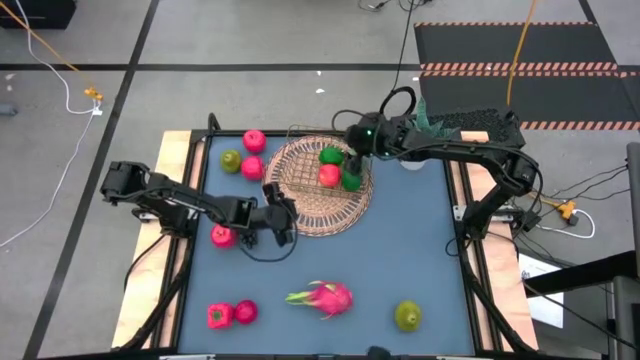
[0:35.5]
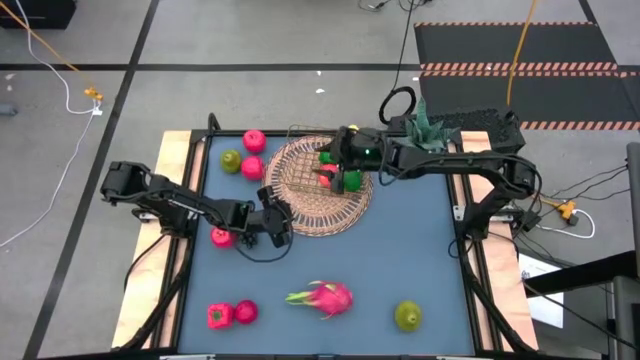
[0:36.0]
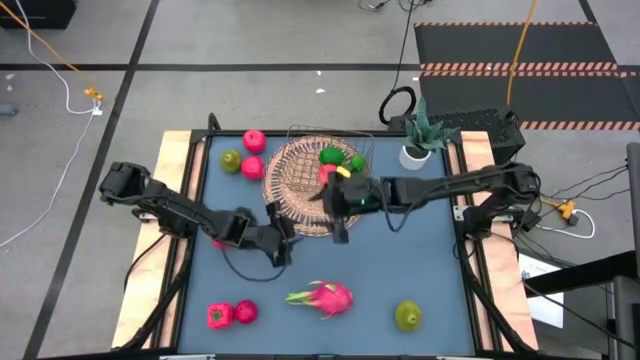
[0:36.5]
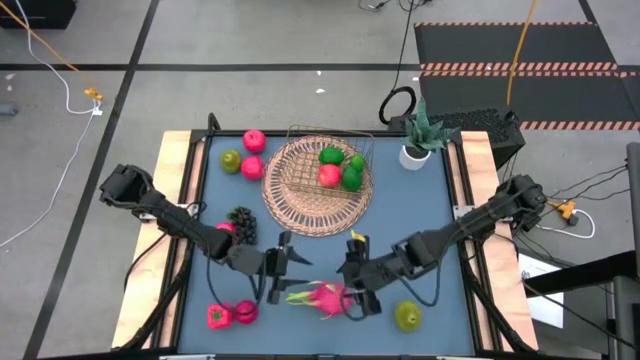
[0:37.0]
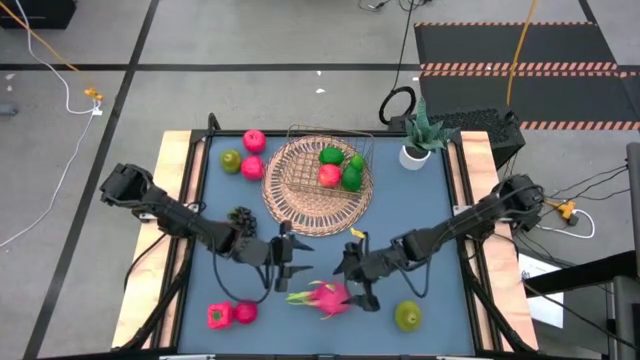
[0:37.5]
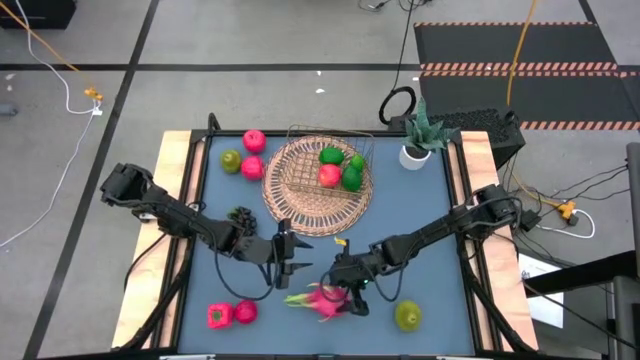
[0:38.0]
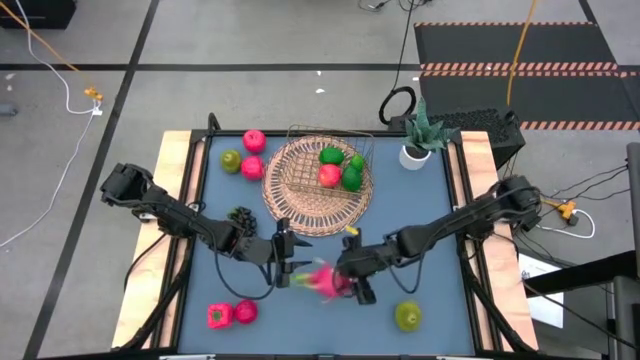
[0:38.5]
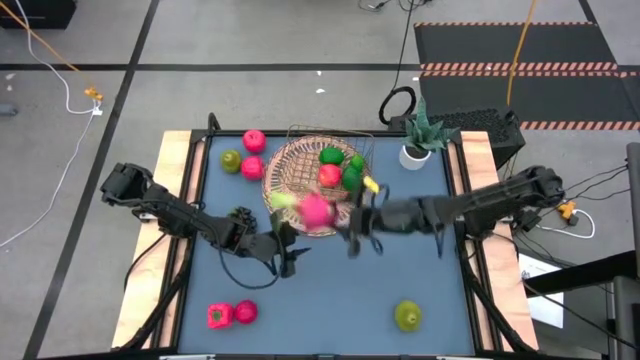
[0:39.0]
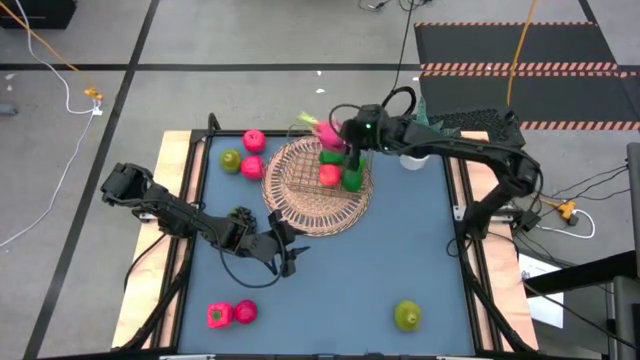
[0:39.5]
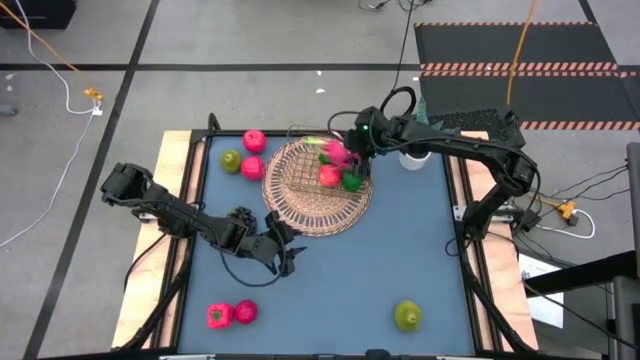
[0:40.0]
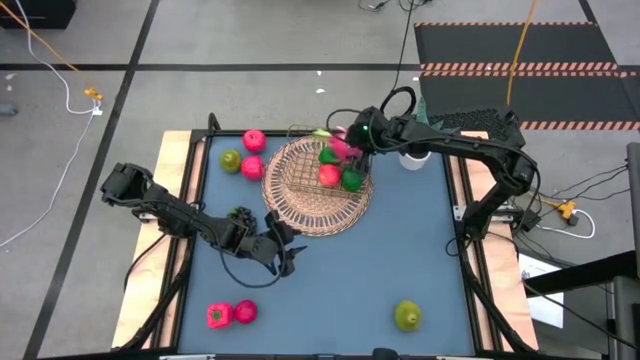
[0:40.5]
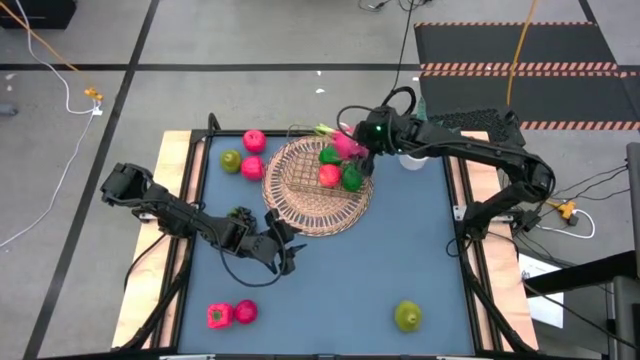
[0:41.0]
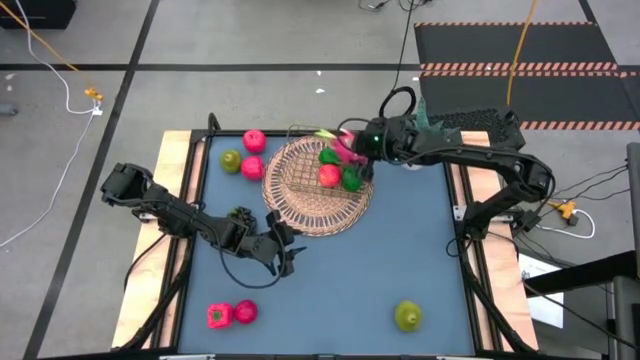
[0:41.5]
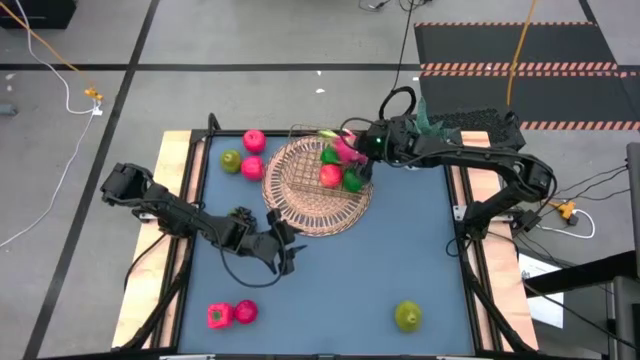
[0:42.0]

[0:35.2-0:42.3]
Task: Build produce basket
Put the dragonfruit into the gold wire basket

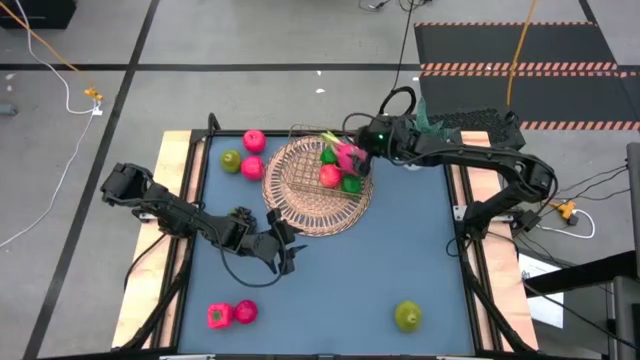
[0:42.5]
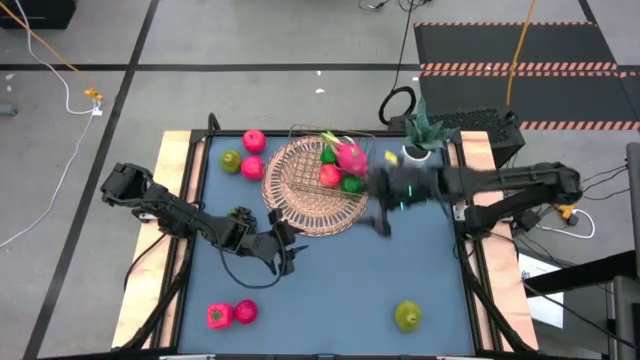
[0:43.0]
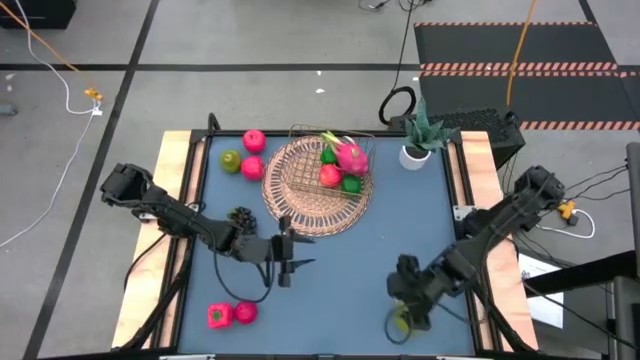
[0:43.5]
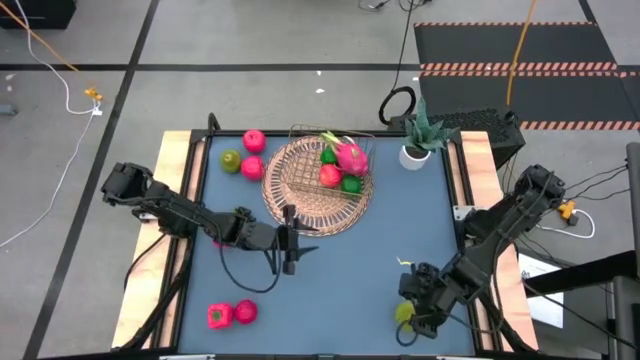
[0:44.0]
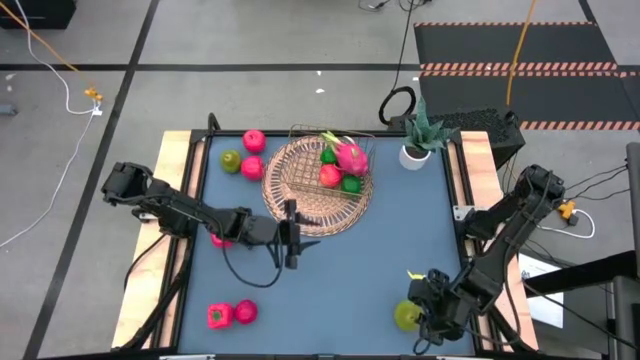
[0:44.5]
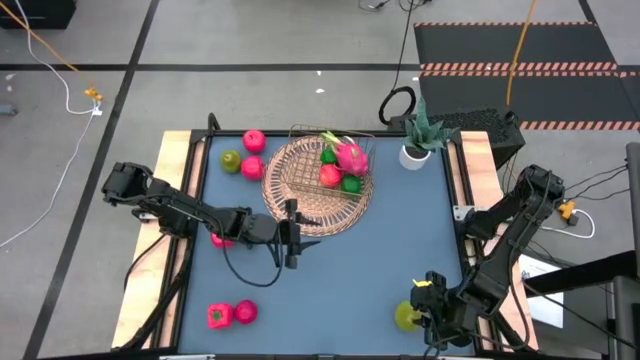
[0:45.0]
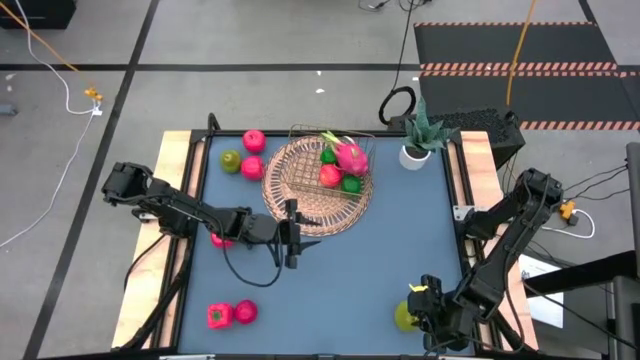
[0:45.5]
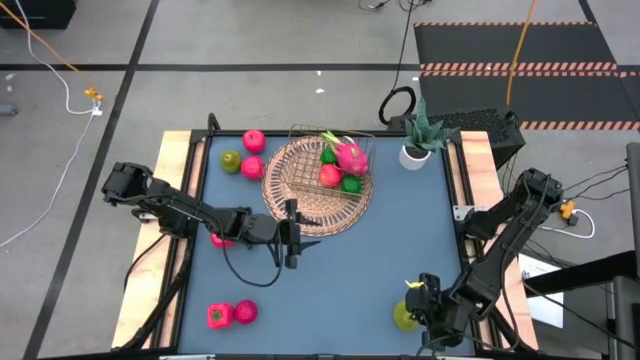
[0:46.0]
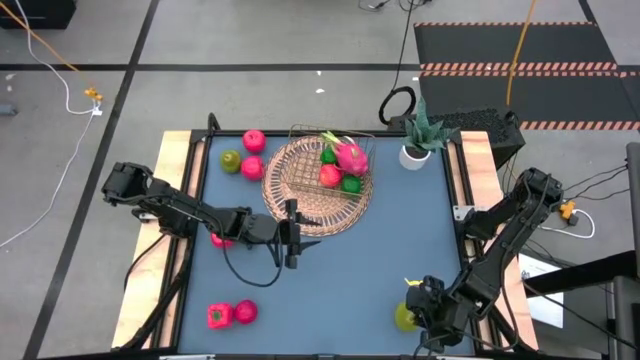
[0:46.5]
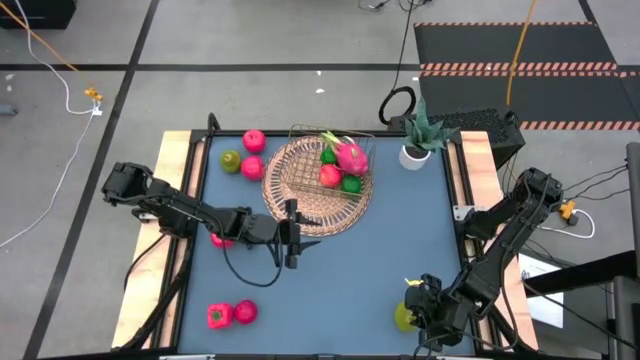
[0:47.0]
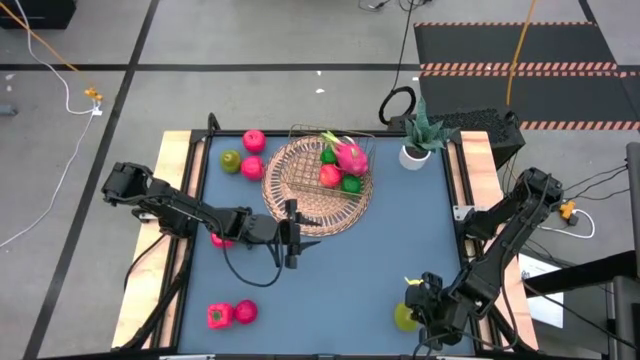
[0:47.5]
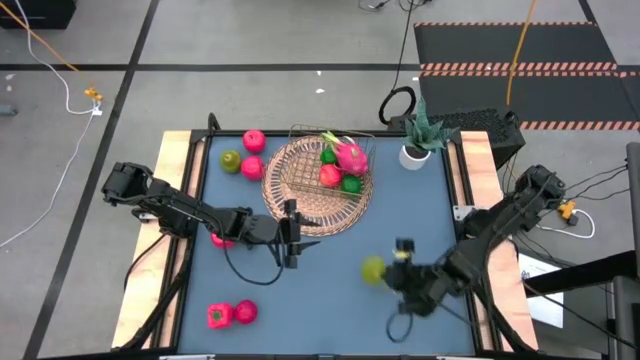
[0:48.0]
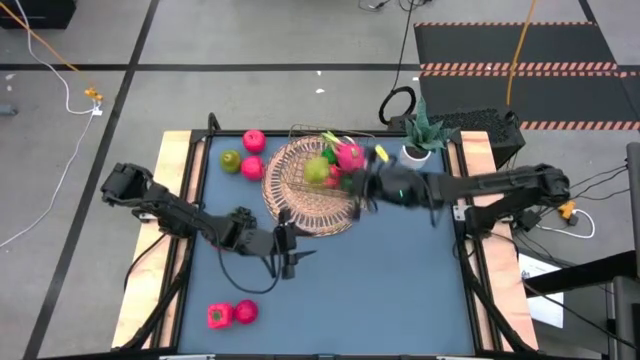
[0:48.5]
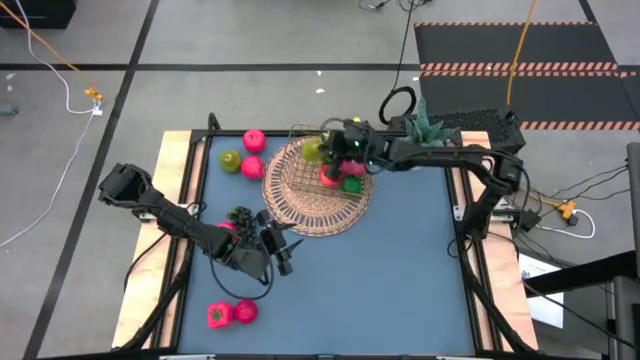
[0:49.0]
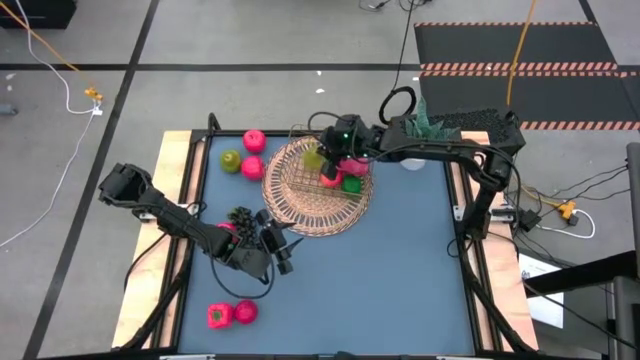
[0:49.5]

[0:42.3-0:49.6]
Put the pear into the gold wire basket

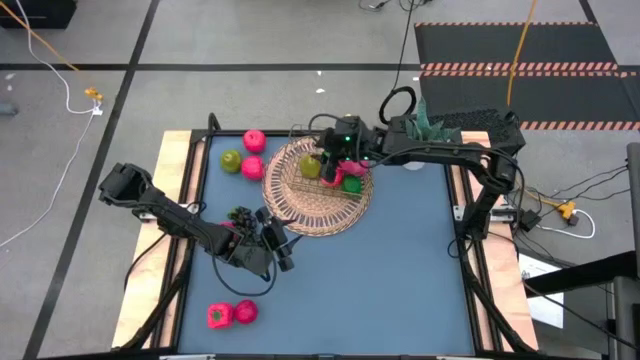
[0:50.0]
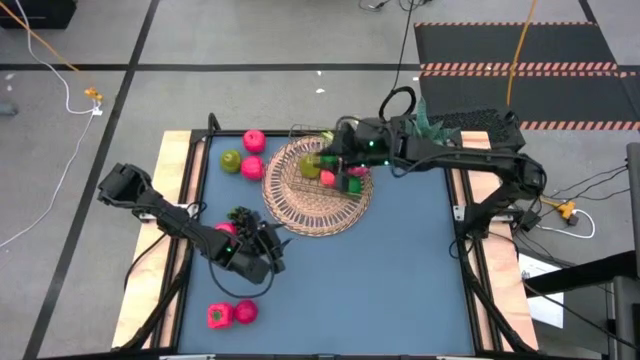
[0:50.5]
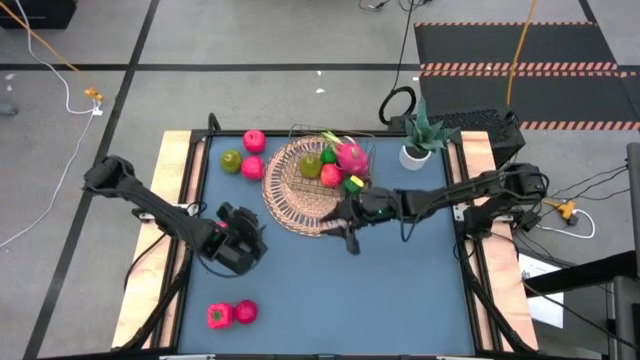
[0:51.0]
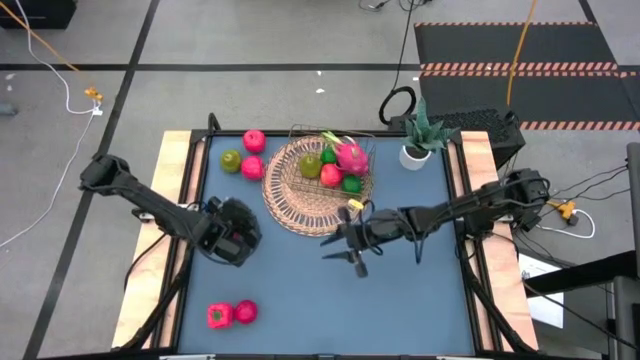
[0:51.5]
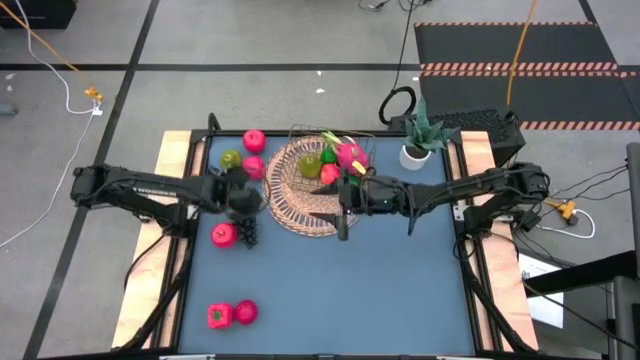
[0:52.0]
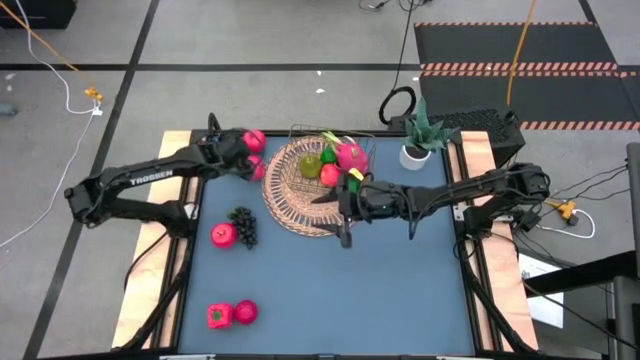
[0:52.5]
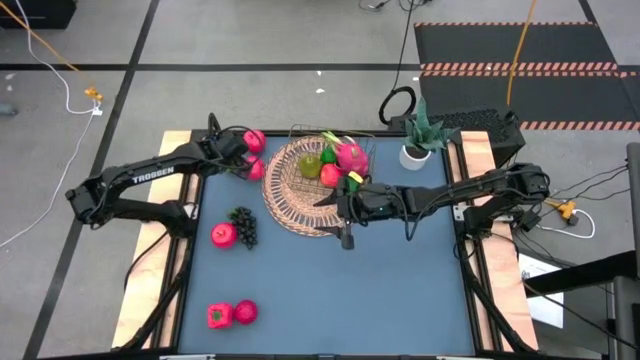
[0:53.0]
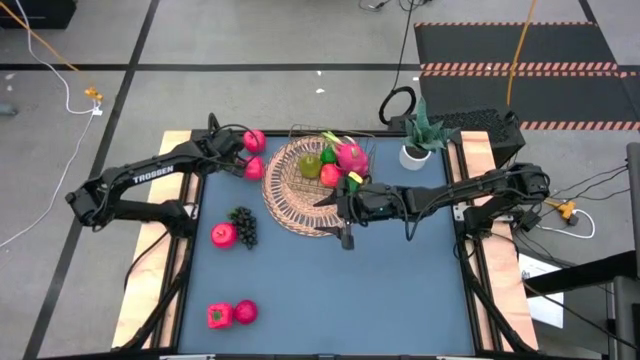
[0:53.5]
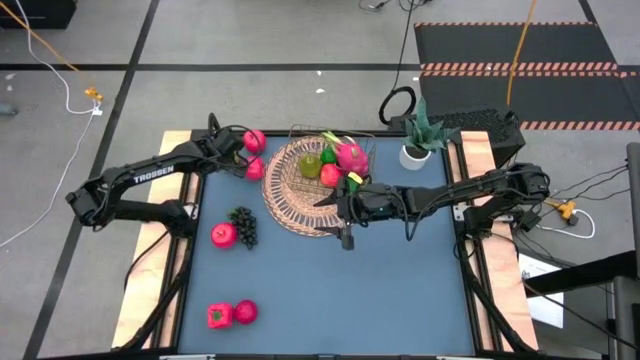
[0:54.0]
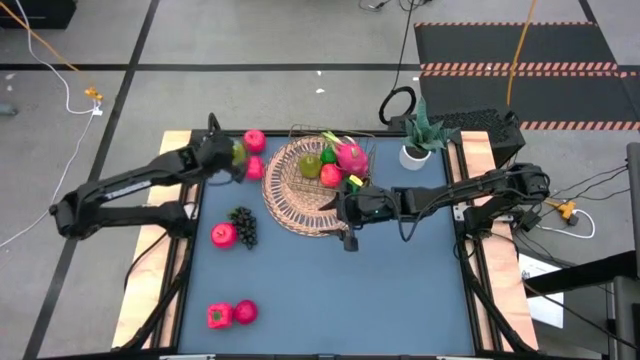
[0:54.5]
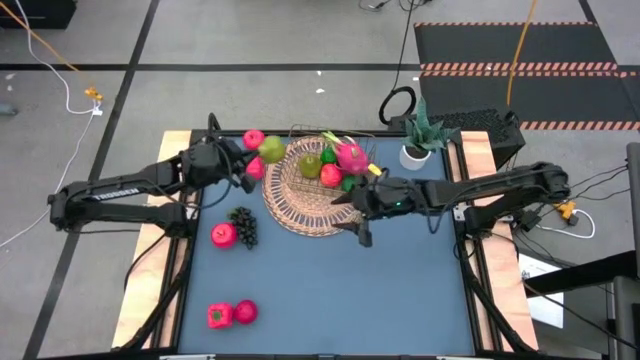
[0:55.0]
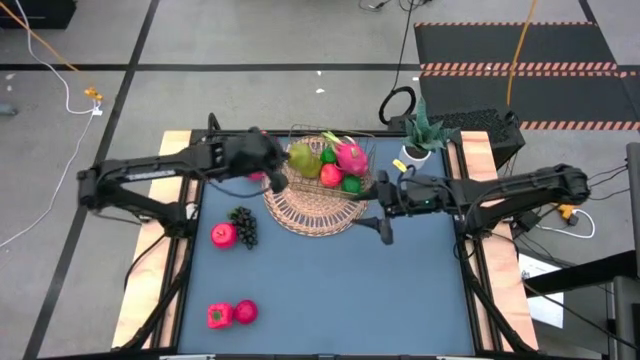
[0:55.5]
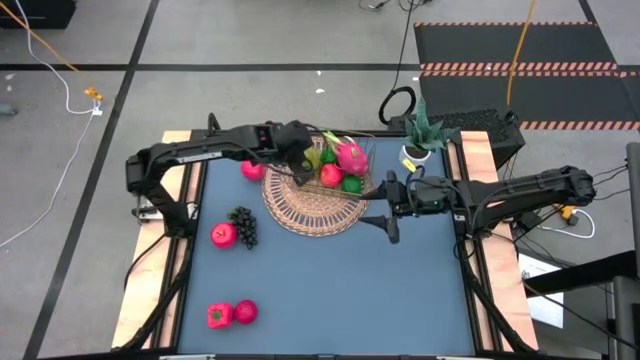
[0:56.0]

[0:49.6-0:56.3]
Put the pear into the gold wire basket
